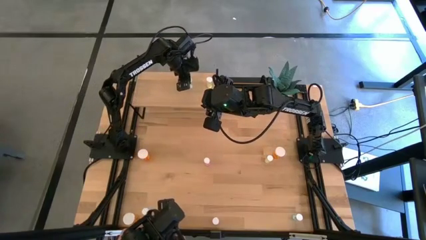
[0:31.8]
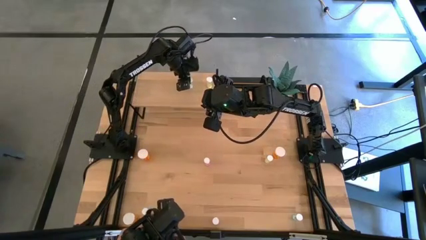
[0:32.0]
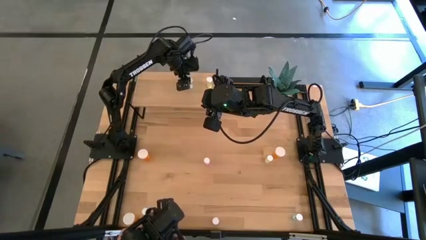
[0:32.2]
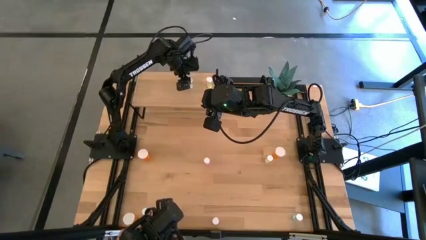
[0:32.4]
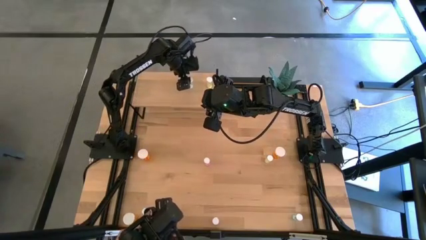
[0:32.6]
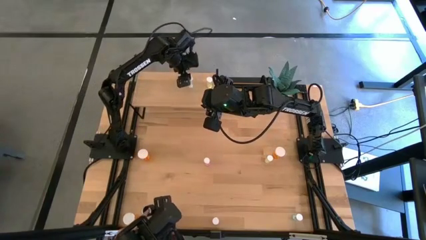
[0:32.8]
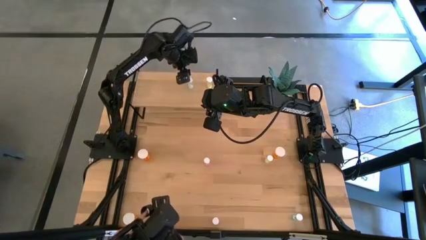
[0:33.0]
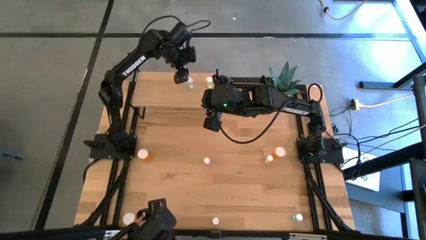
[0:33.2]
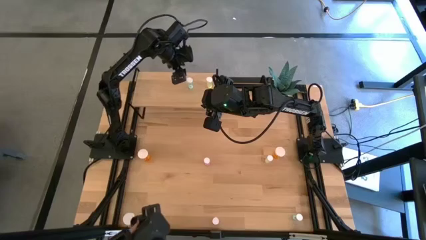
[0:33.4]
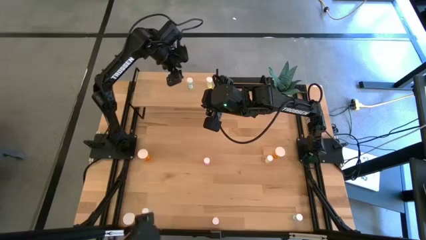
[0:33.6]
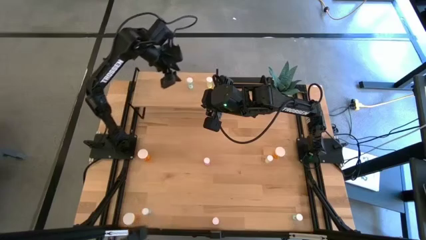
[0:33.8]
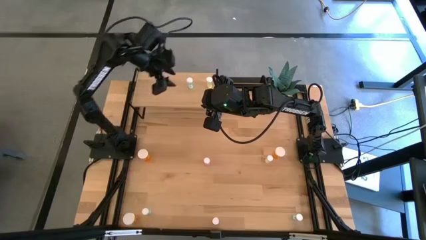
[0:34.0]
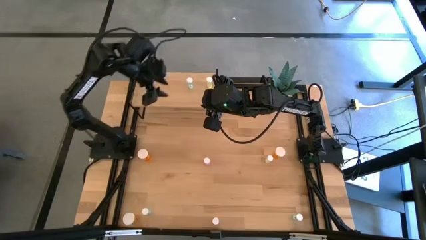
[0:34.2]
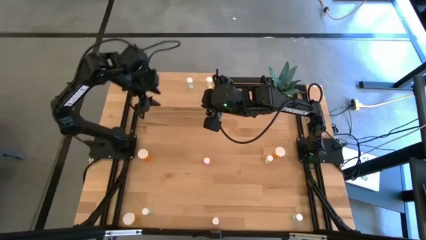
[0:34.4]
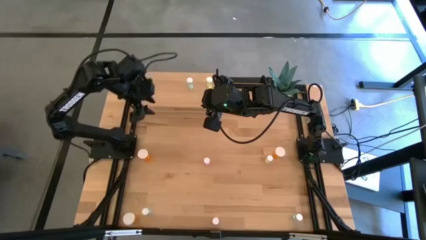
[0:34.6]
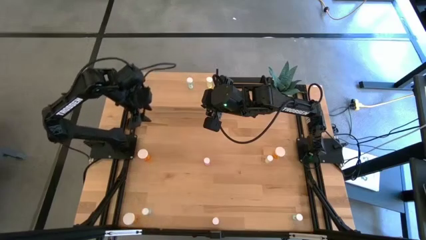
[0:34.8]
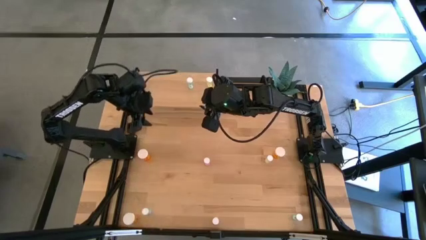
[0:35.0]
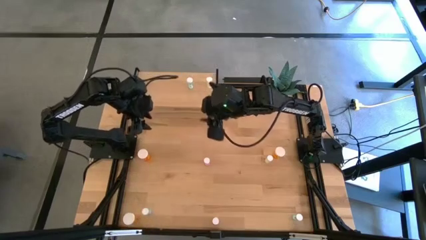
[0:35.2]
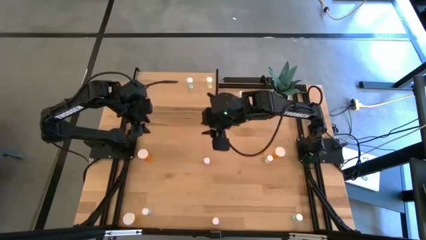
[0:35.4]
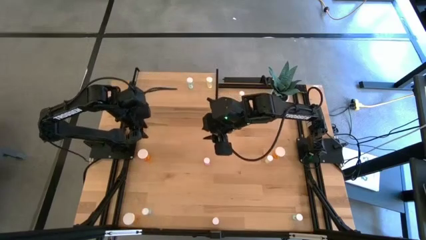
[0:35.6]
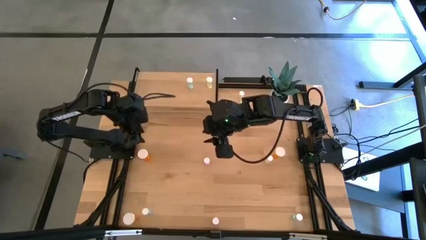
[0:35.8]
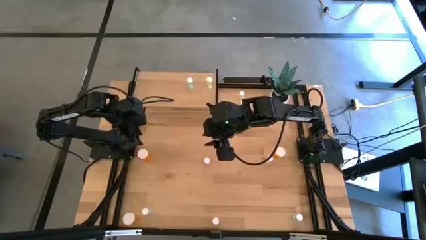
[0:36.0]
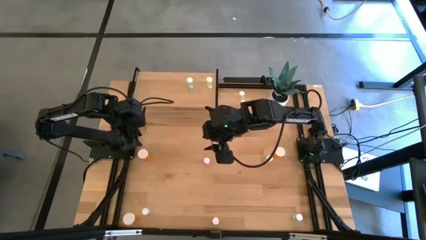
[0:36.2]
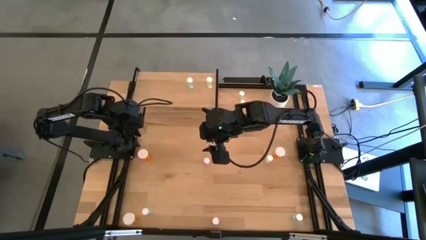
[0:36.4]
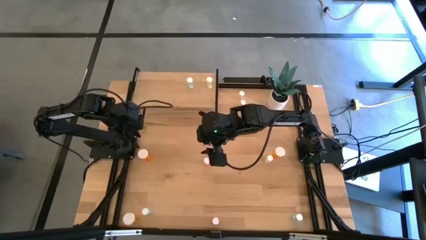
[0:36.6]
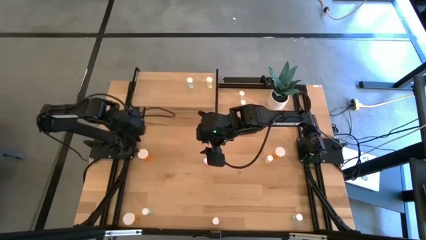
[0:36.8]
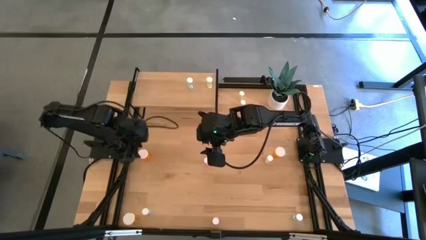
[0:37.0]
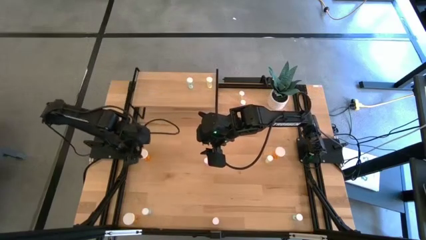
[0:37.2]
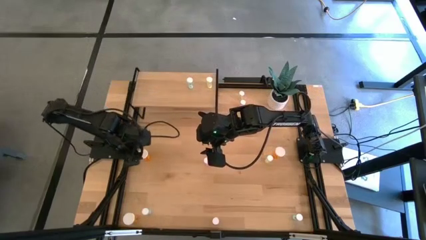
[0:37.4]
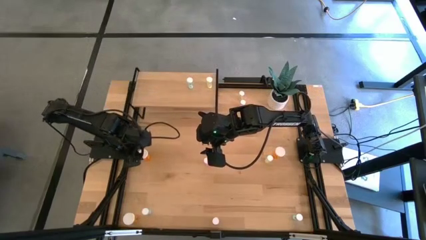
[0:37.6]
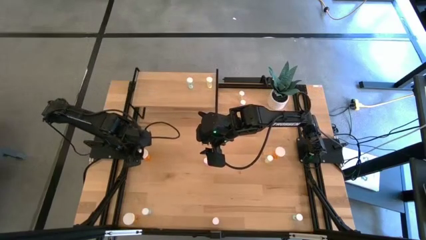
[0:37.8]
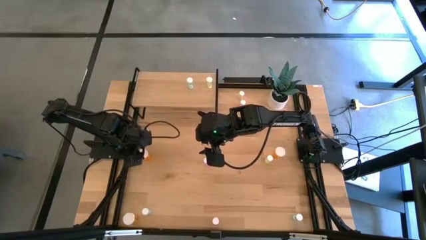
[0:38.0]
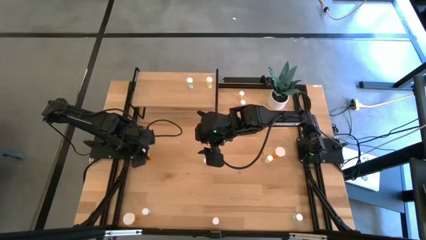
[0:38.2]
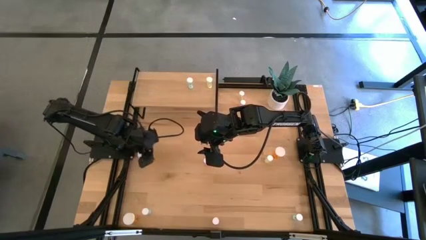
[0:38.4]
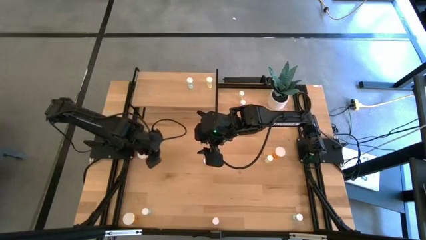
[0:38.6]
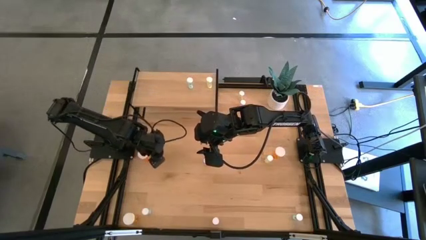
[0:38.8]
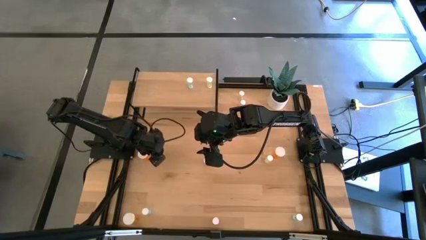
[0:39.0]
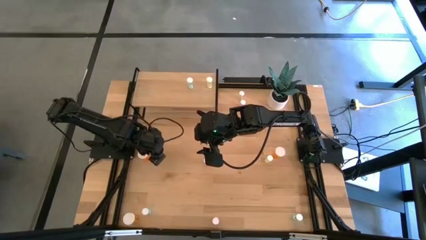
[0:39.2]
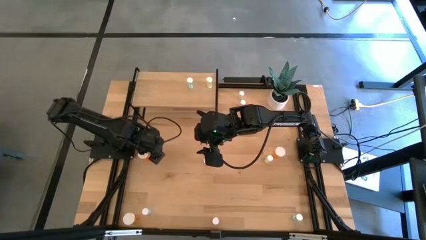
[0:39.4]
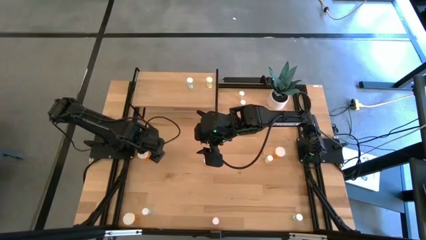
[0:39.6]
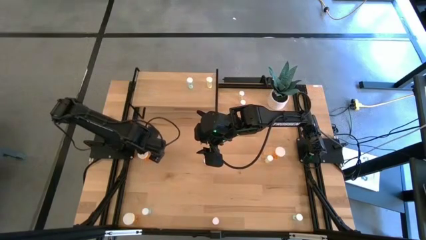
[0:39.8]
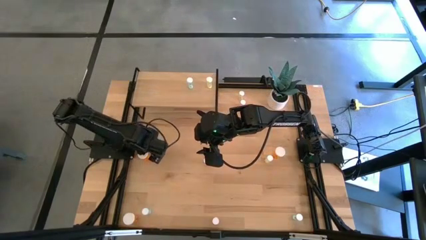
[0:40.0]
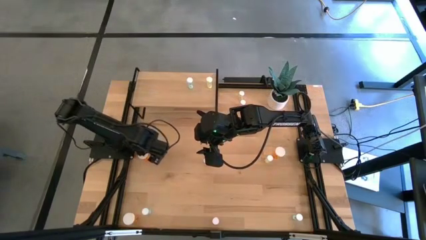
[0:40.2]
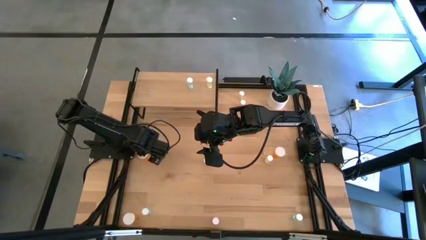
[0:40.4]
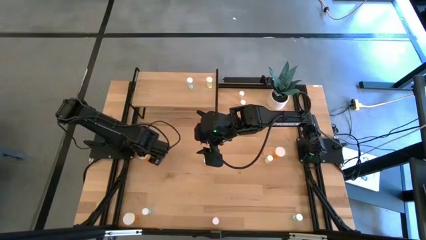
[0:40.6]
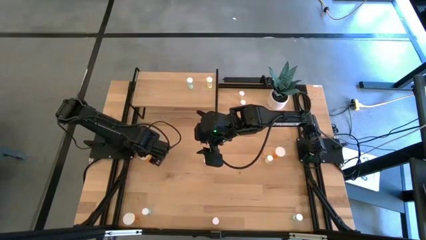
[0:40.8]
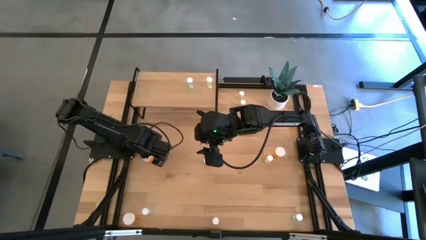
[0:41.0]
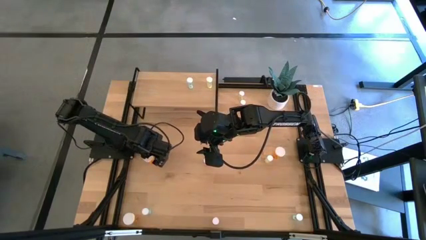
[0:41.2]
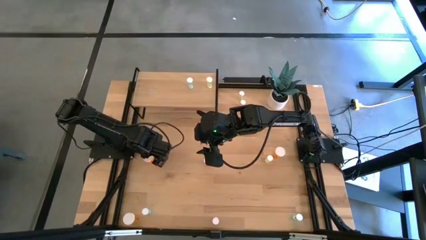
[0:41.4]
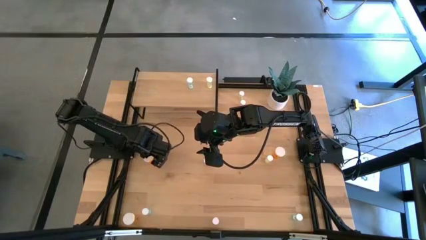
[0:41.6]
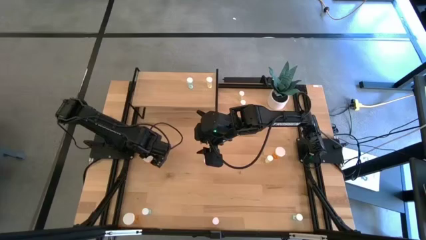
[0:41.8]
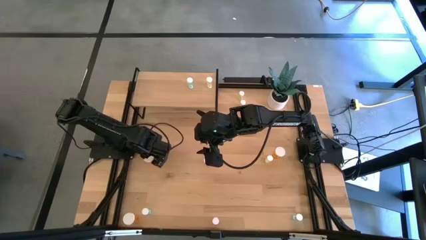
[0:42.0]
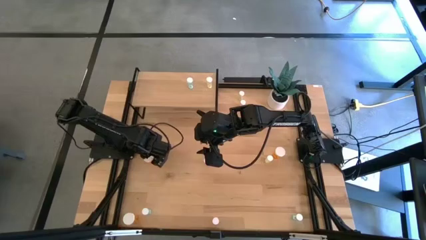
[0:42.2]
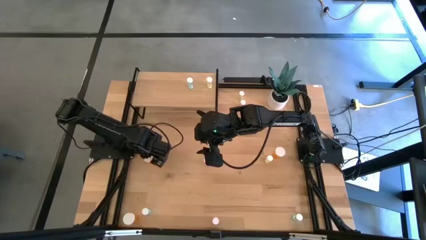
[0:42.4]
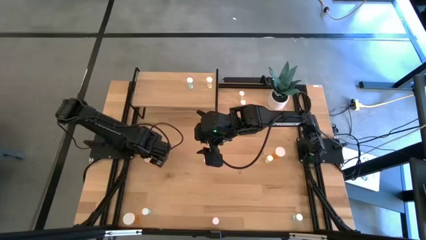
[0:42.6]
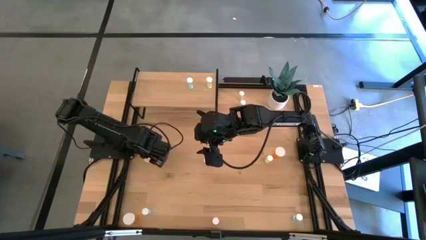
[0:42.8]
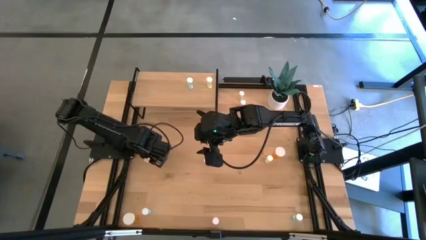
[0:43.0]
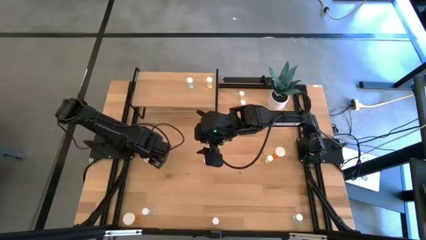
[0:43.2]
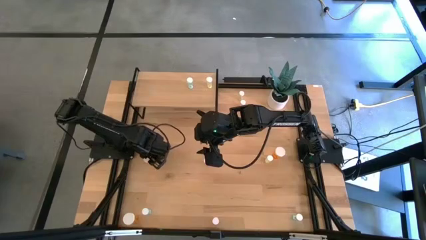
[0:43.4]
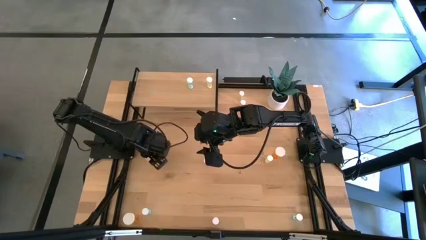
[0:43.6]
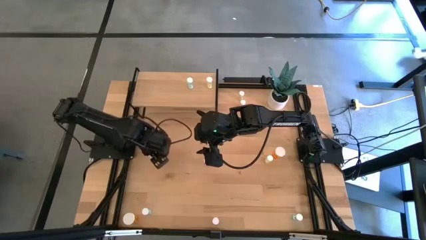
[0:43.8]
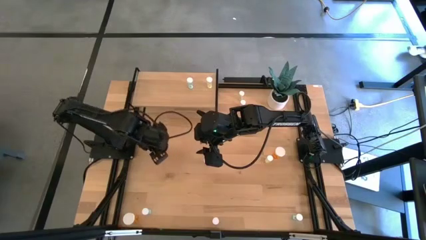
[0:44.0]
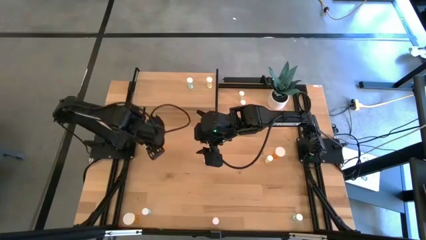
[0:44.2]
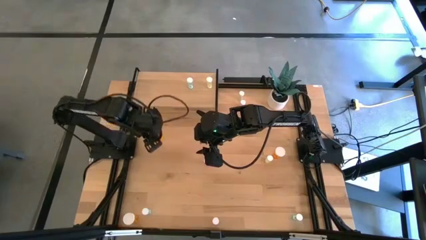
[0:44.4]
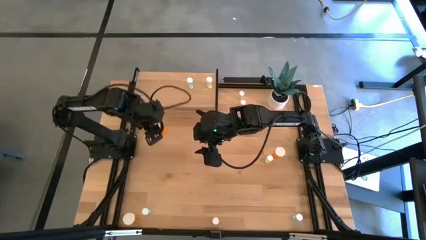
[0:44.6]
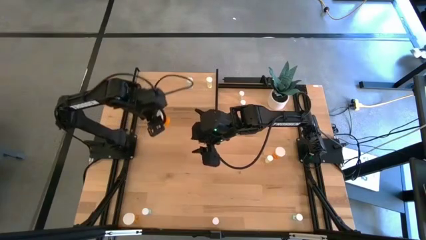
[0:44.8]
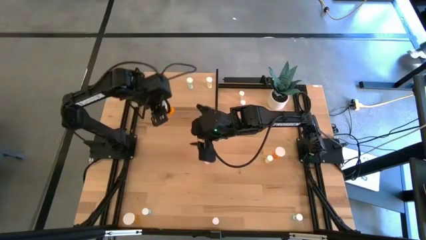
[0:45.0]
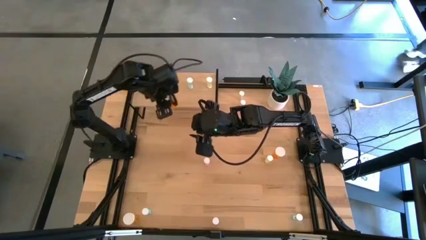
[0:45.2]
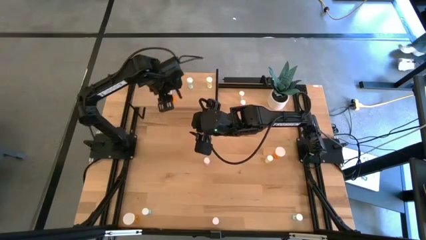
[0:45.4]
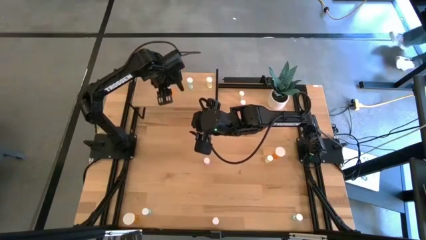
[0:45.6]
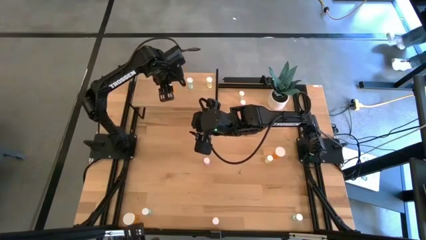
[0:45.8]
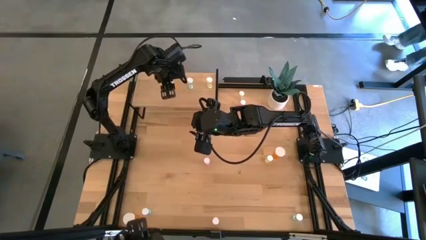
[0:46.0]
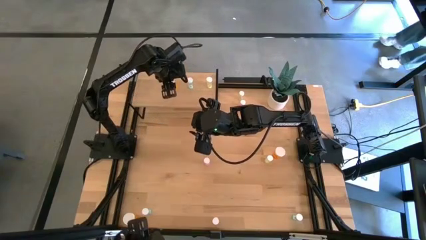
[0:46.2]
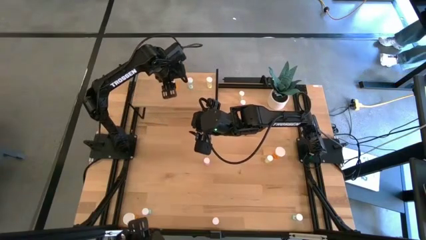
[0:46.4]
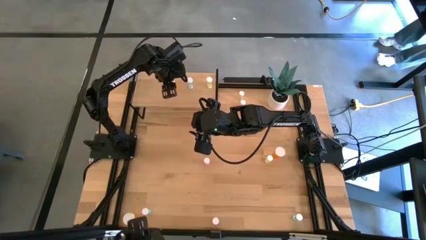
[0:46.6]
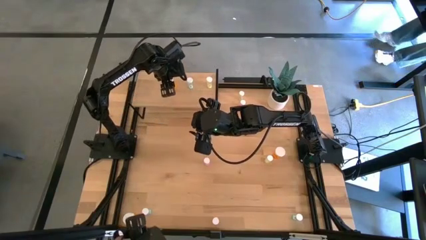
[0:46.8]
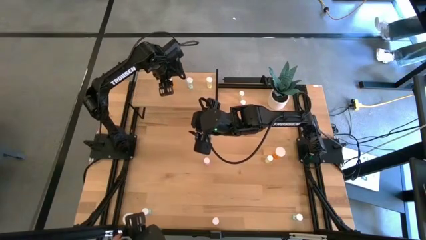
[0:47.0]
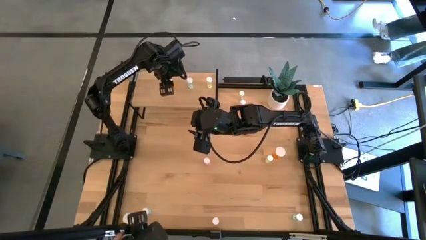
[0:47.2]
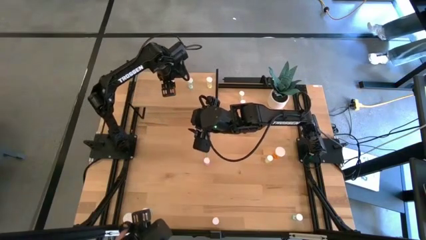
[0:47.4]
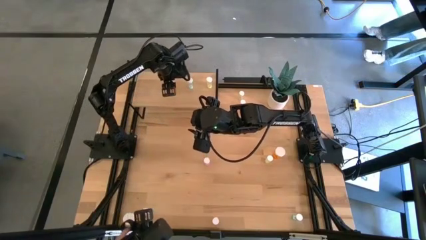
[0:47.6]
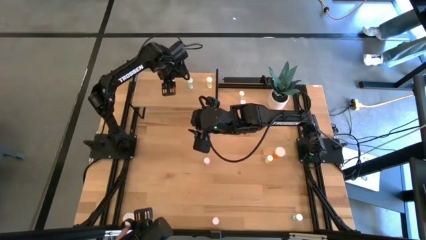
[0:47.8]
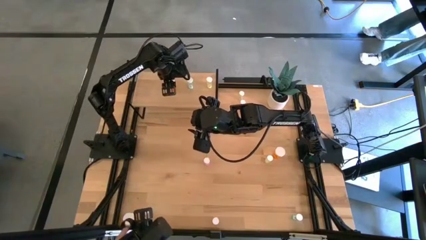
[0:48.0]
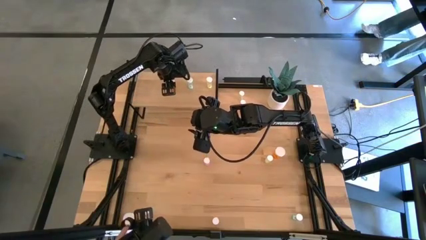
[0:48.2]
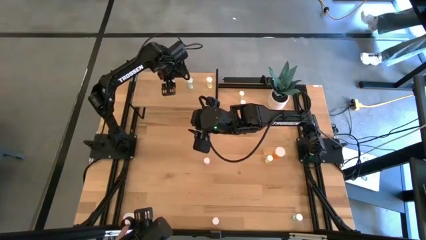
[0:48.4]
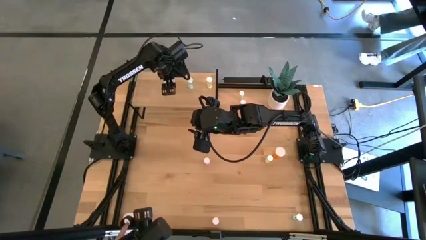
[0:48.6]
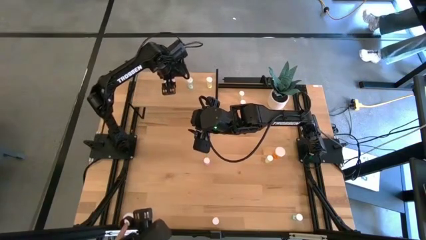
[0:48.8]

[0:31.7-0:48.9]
Task: Pick and place medicine bottles onto shelf by color
Put the top left orange pill bottle on the shelf
